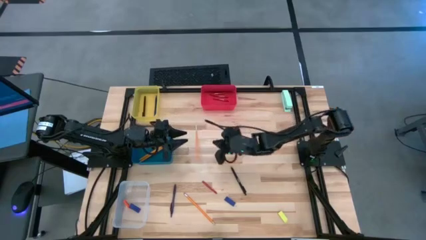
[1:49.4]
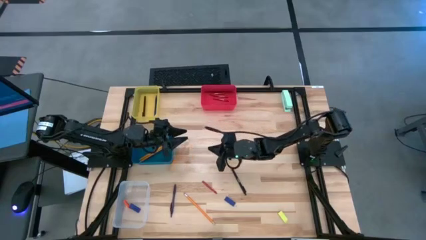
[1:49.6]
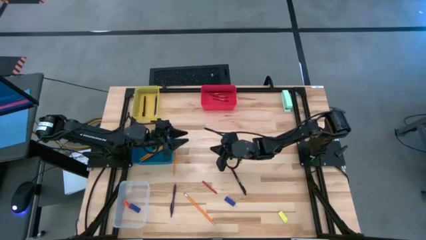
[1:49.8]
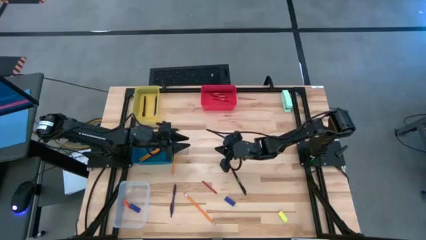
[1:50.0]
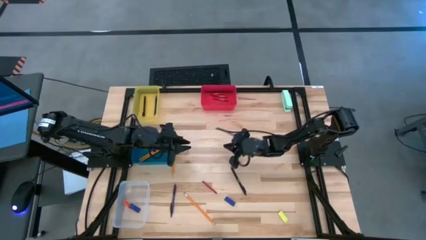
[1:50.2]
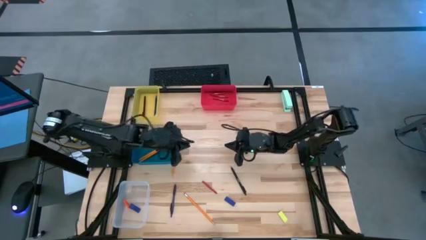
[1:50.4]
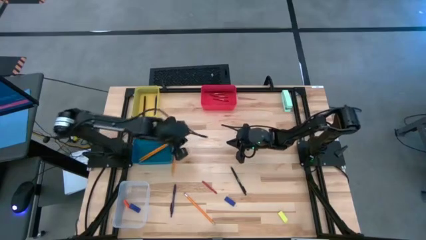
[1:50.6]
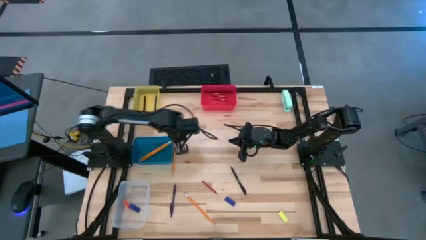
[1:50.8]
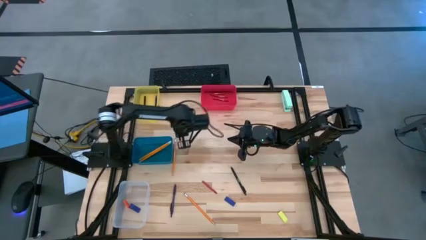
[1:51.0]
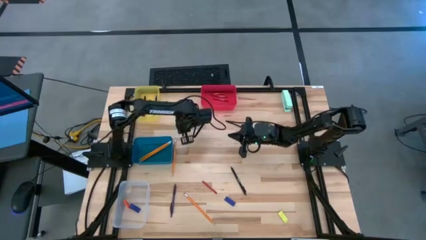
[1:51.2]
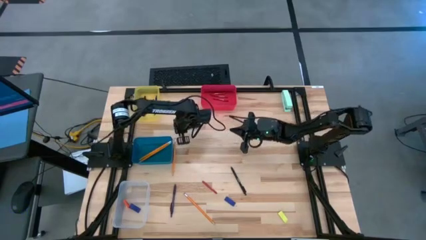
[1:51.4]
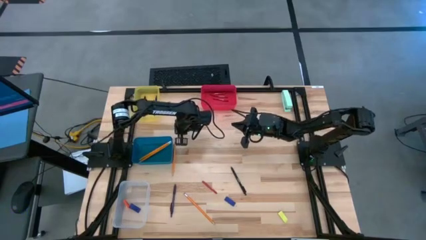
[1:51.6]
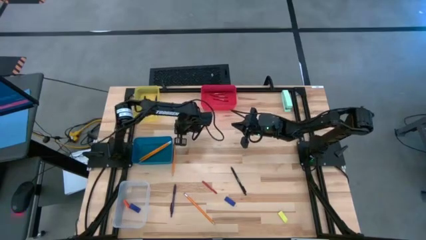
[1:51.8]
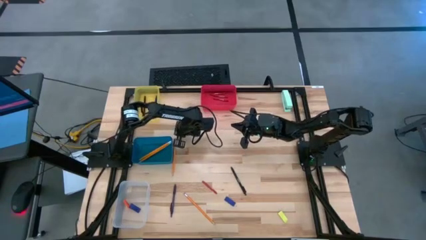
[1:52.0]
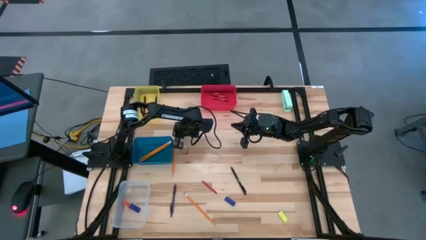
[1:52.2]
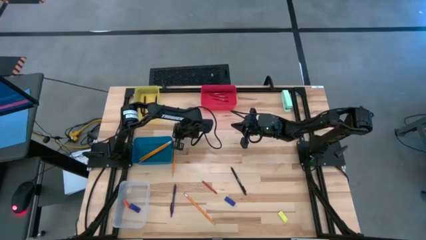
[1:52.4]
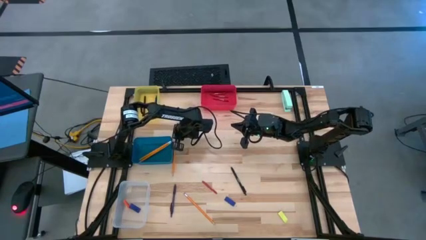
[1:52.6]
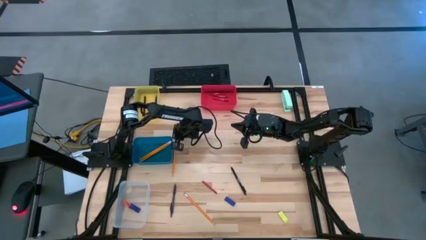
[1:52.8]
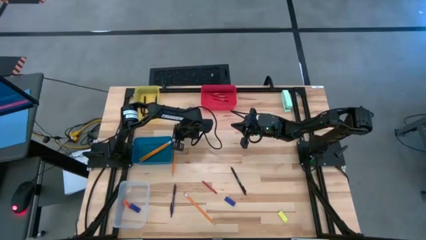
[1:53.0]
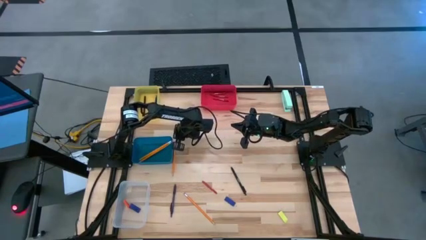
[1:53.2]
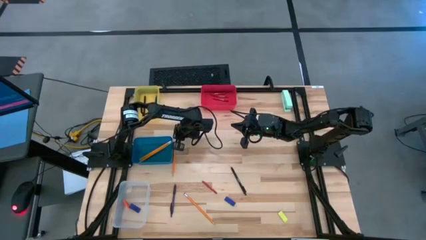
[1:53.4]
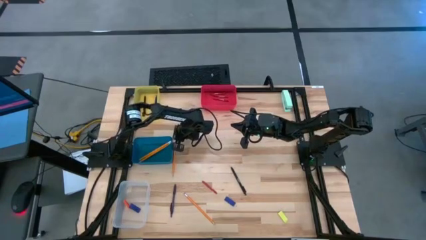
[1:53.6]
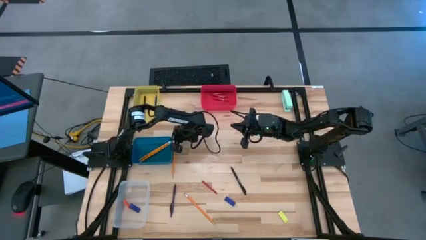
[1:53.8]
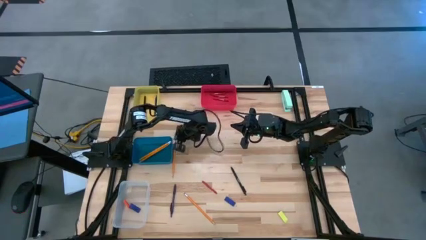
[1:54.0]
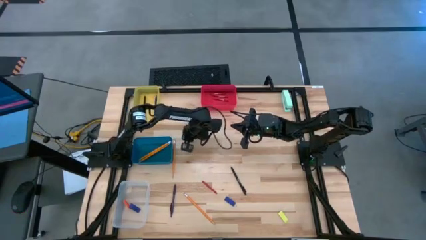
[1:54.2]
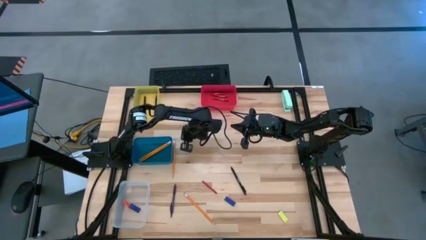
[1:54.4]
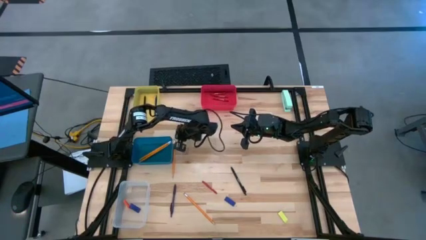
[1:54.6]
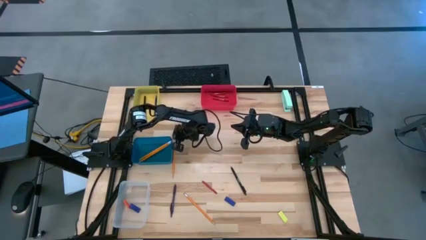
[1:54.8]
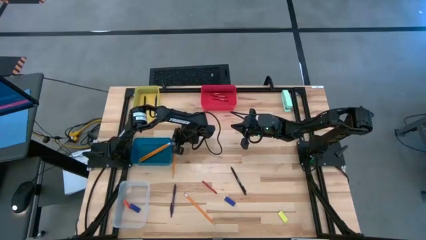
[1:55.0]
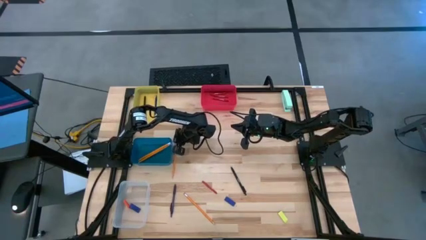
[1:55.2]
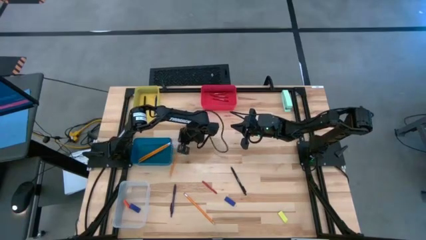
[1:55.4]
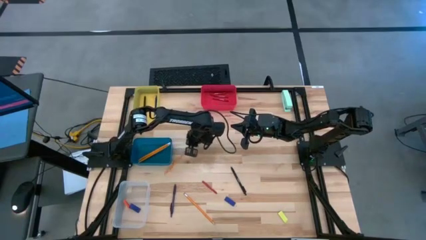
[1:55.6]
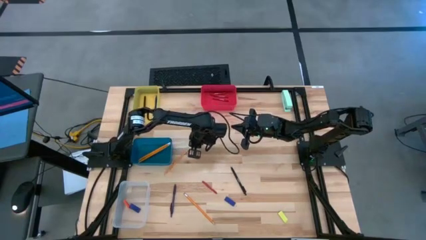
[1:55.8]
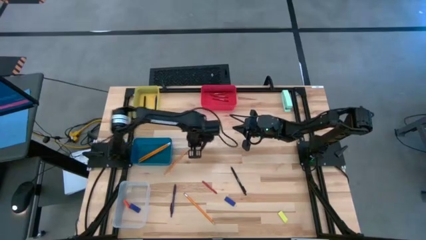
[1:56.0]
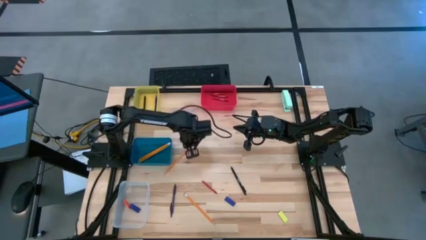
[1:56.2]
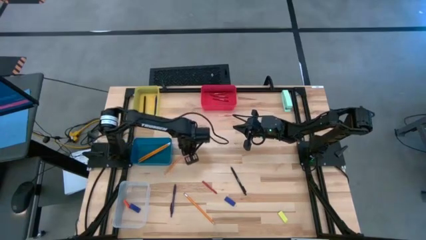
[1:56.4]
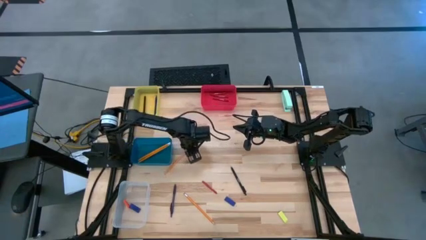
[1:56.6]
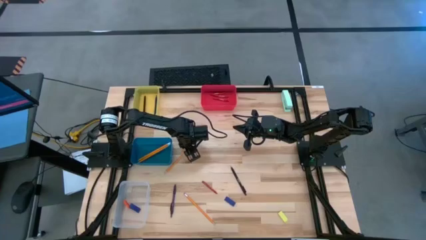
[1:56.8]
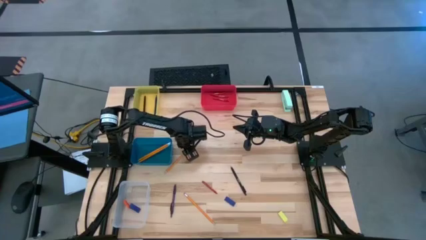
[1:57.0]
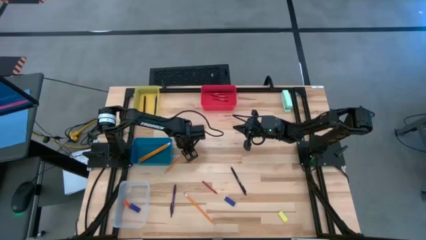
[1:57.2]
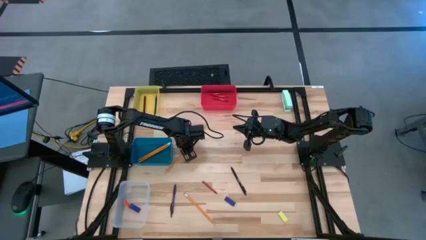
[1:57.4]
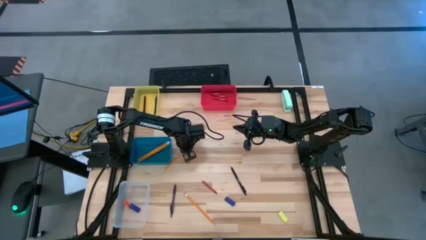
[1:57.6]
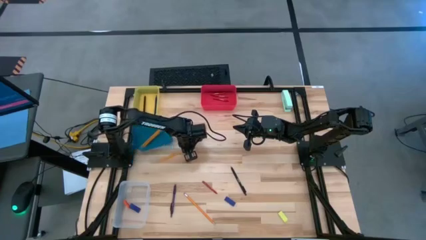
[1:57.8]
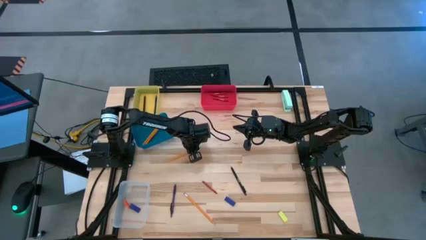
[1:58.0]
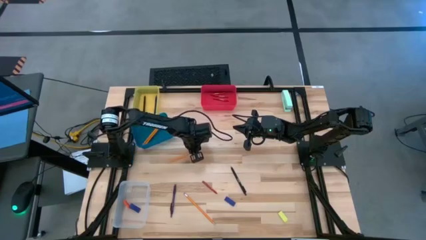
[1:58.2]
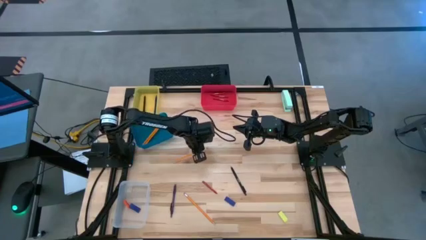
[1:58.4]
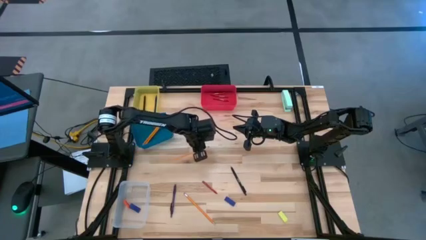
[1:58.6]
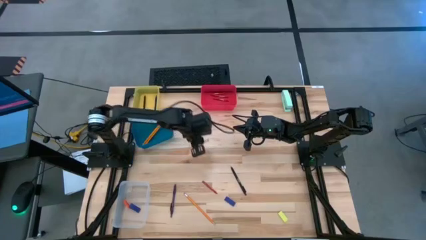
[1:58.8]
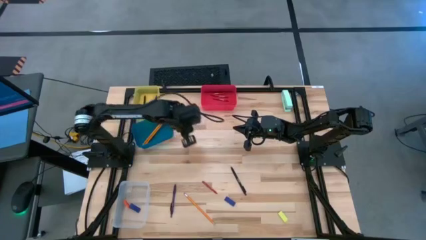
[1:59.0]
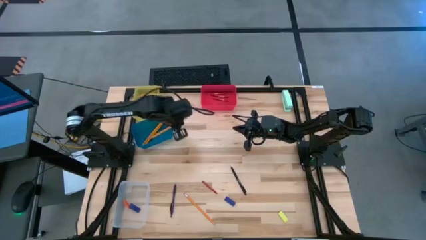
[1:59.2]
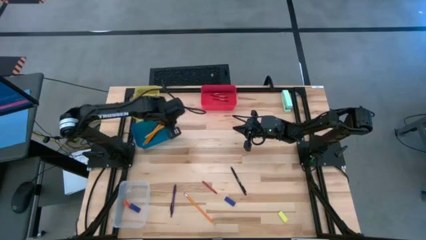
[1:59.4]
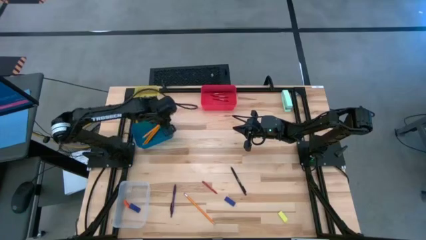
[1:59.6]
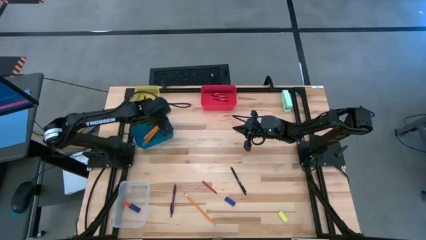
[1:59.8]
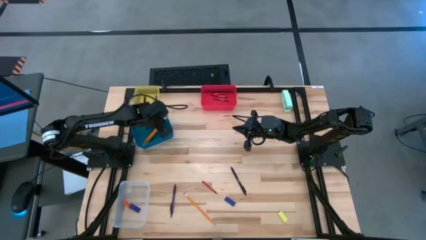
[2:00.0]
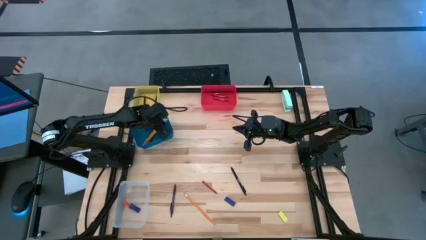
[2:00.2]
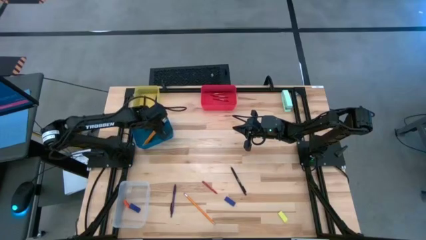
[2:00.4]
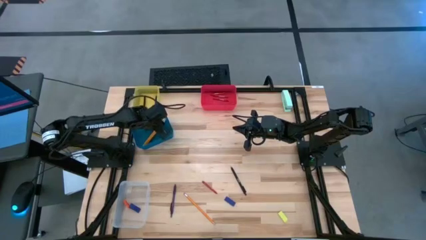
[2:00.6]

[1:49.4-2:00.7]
Task: Sort crayons/erasers/pens/pencils in bins
Put the yellow pencil into the blue bin

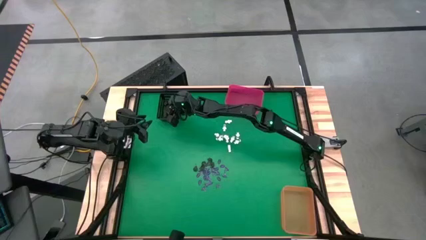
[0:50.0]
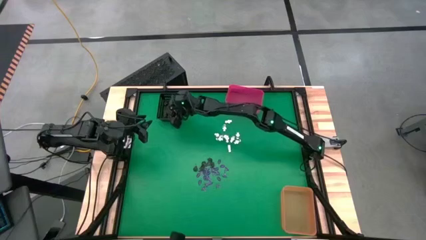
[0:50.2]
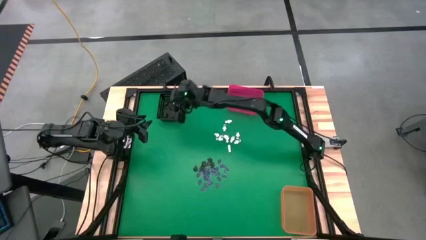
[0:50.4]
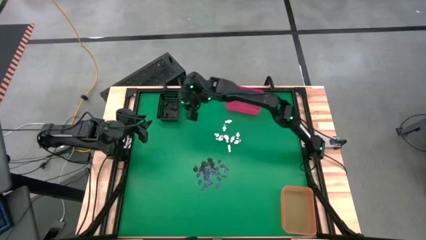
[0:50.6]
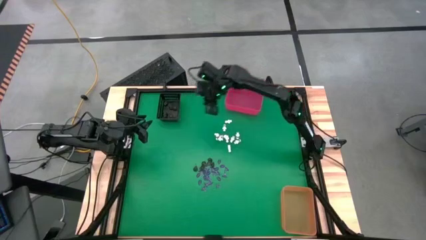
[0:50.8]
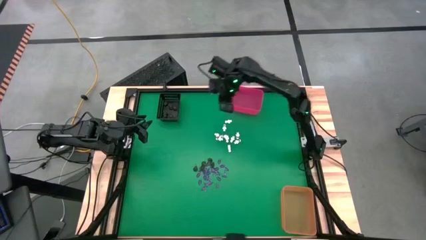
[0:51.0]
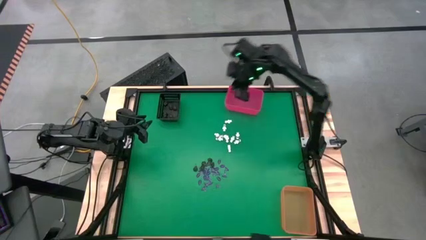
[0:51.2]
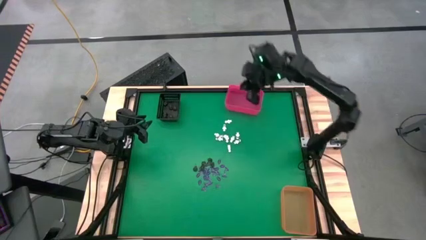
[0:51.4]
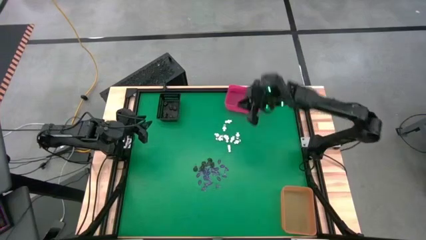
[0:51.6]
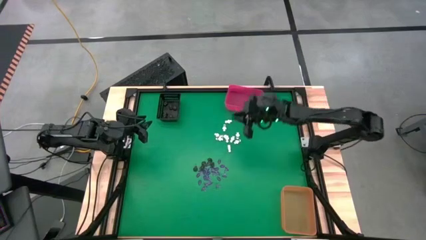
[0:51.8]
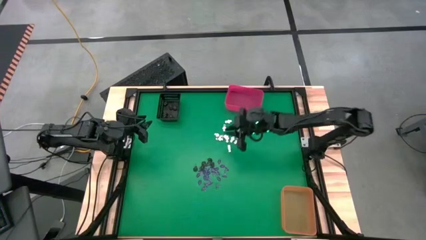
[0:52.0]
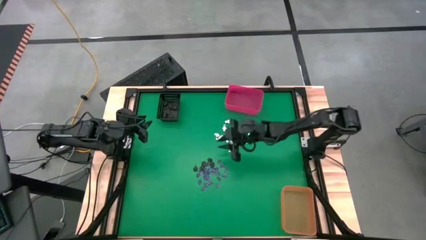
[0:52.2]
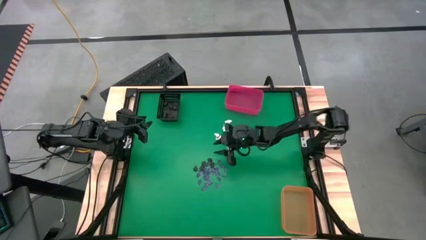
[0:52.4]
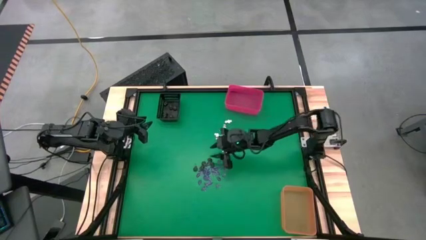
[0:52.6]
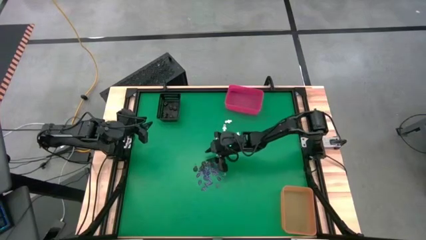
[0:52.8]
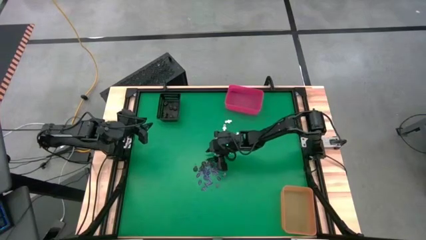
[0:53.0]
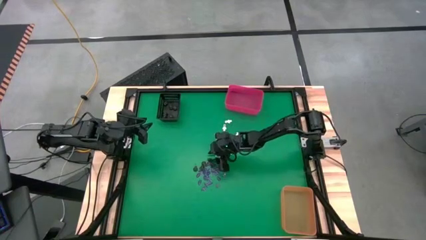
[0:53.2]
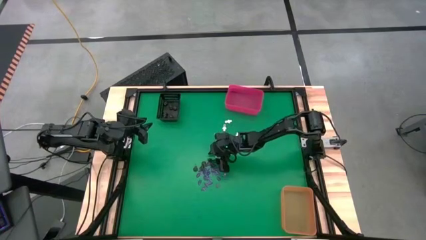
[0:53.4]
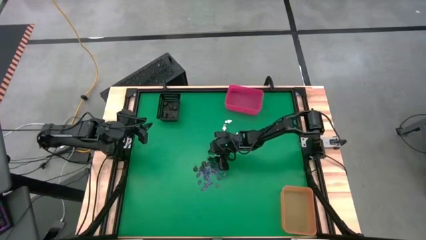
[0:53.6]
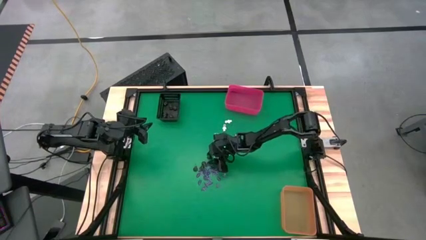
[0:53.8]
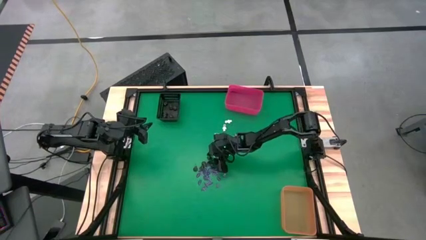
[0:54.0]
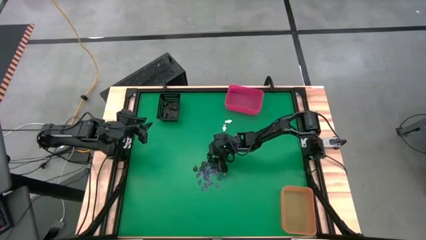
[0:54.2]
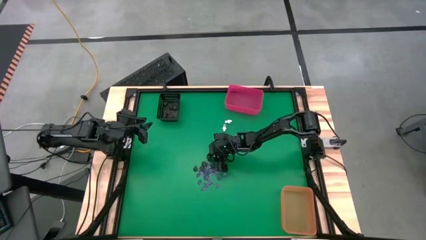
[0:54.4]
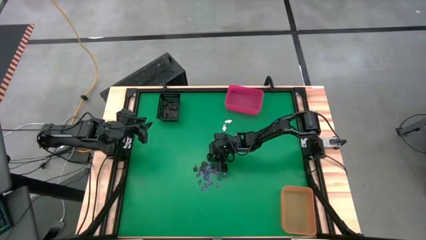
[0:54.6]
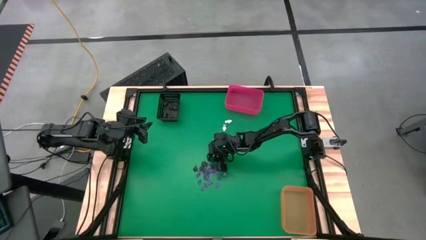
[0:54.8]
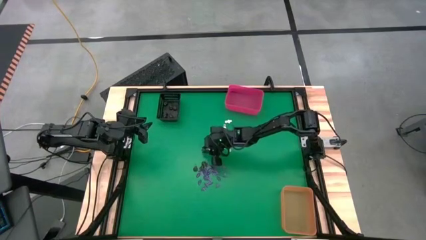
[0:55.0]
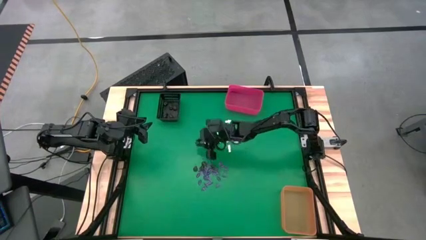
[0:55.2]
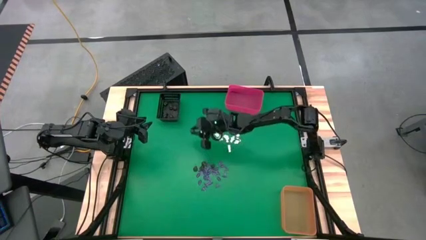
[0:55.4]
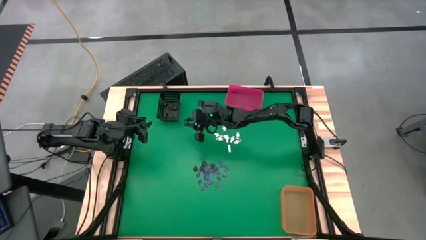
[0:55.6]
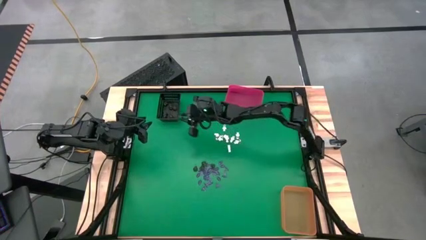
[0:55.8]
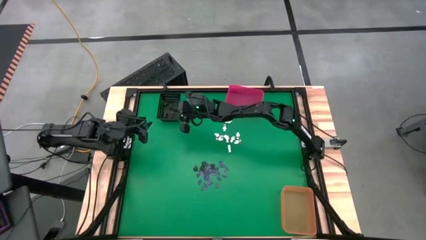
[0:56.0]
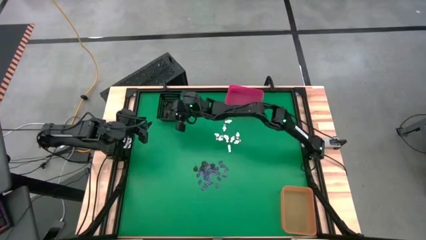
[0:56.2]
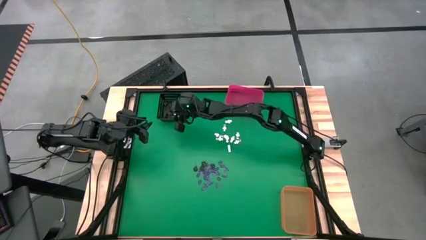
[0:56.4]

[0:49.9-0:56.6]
Task: Sort Halloween decoration
Put the brown skull toy into the black bin
